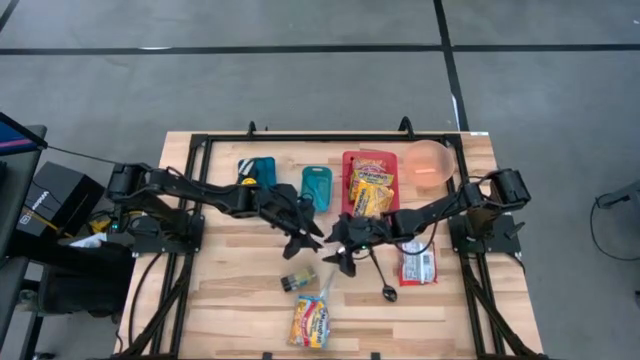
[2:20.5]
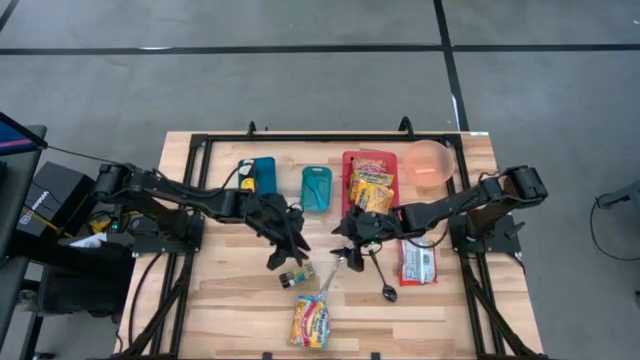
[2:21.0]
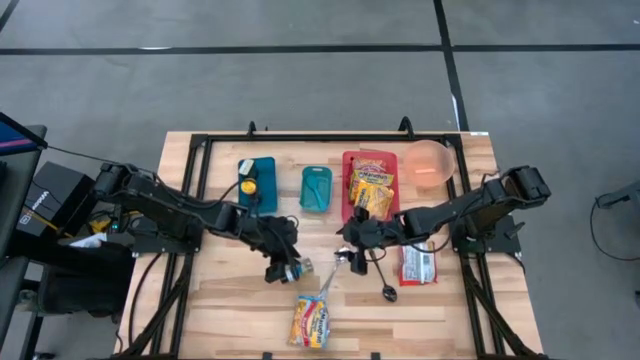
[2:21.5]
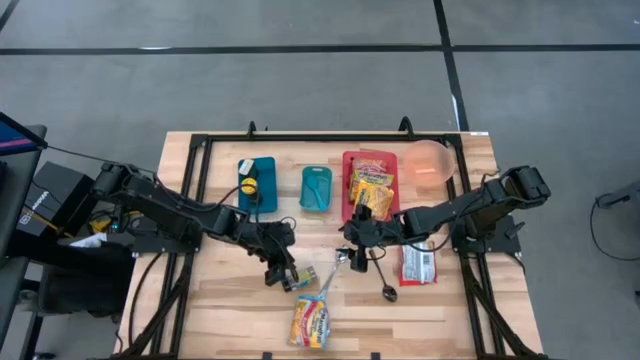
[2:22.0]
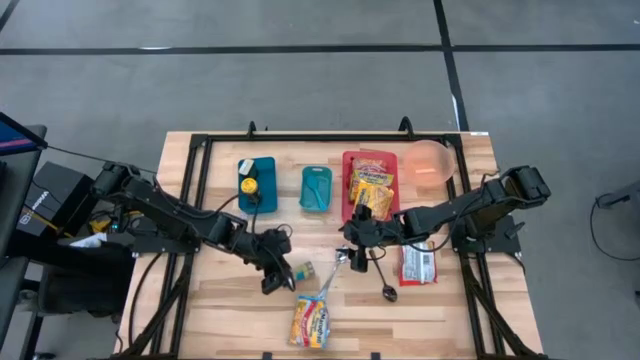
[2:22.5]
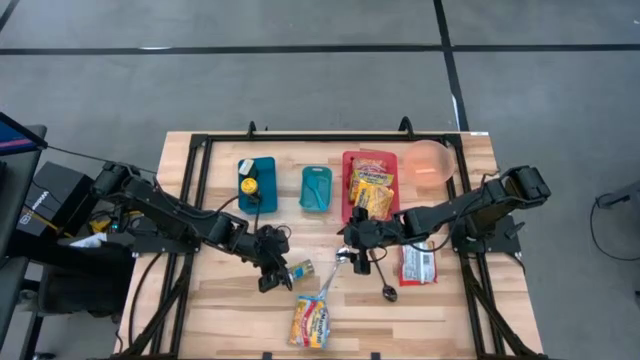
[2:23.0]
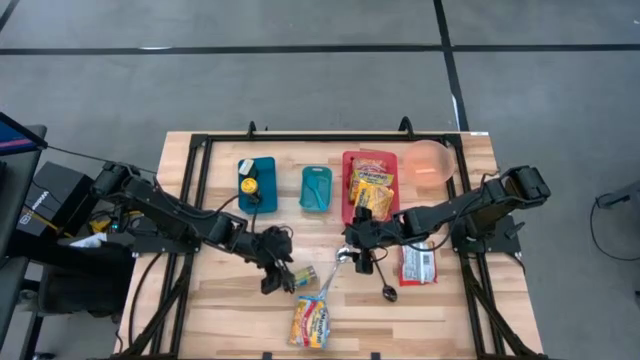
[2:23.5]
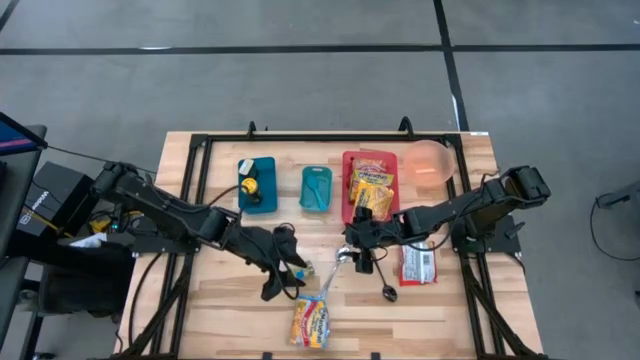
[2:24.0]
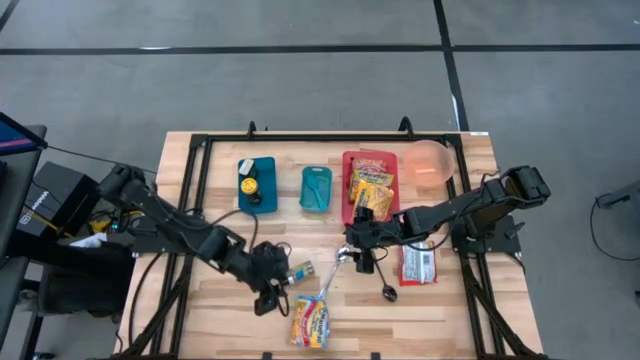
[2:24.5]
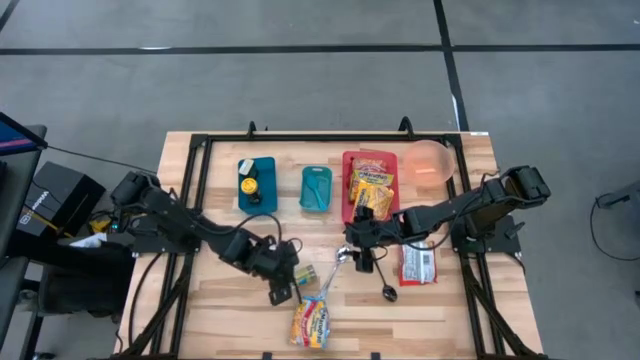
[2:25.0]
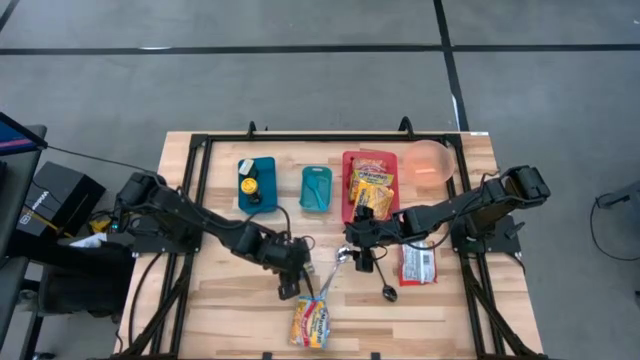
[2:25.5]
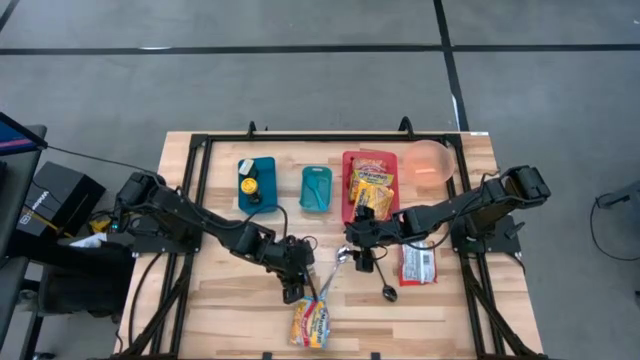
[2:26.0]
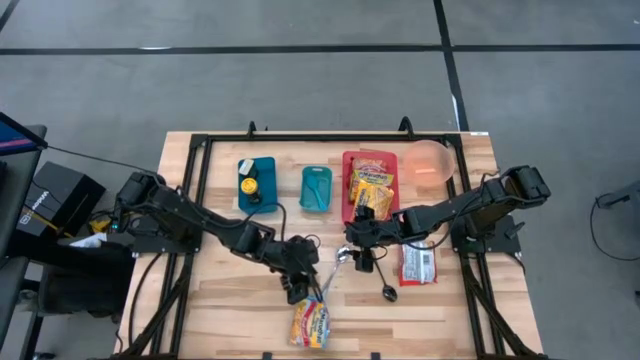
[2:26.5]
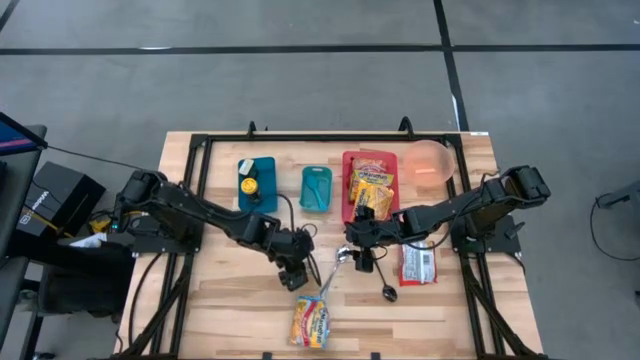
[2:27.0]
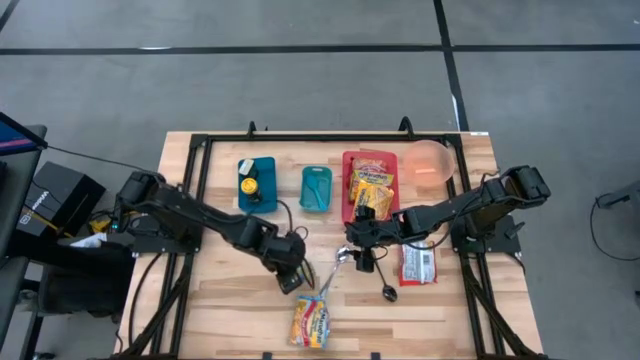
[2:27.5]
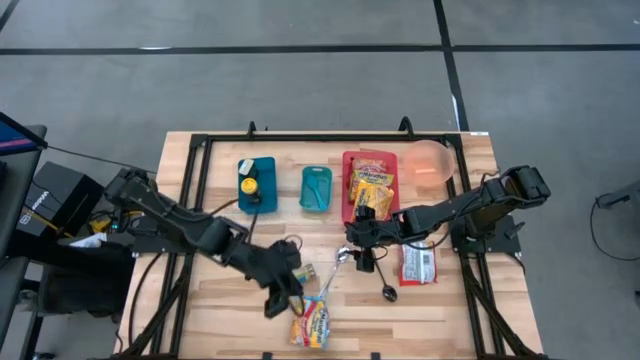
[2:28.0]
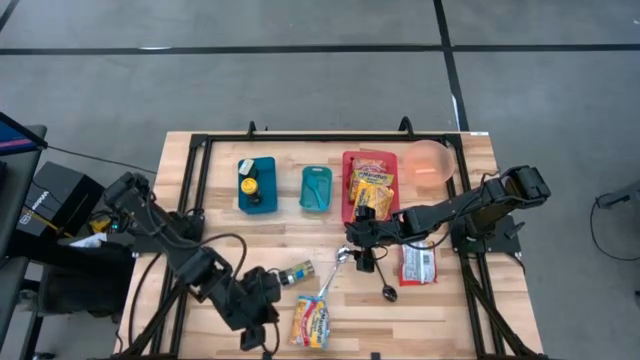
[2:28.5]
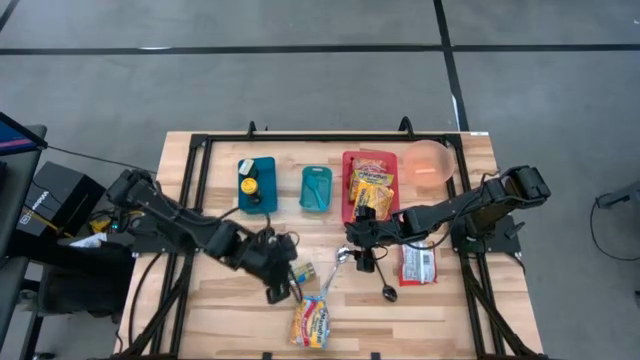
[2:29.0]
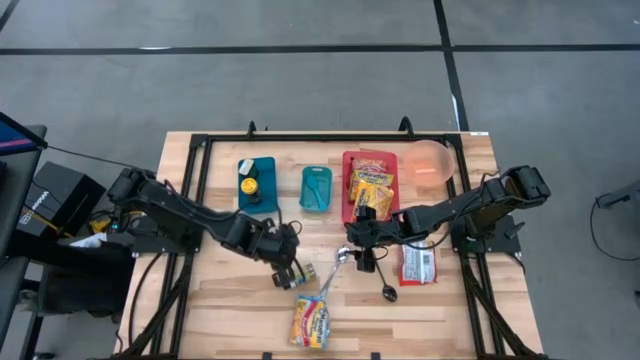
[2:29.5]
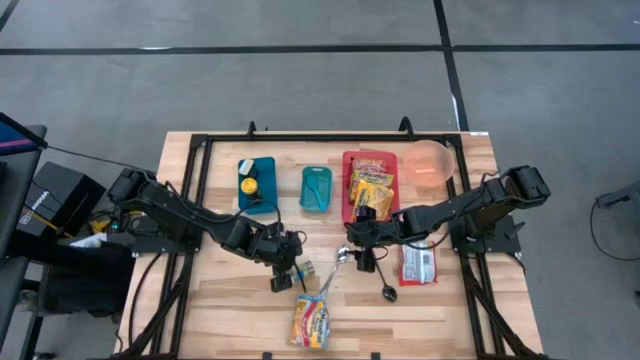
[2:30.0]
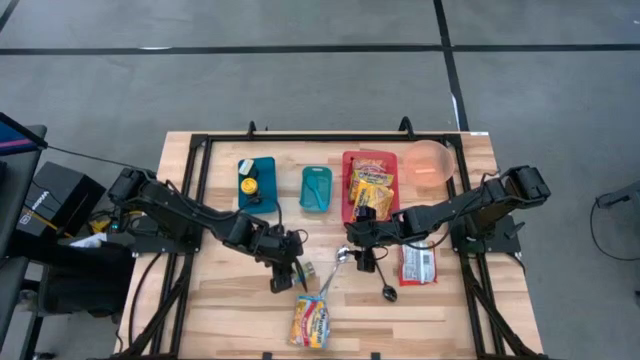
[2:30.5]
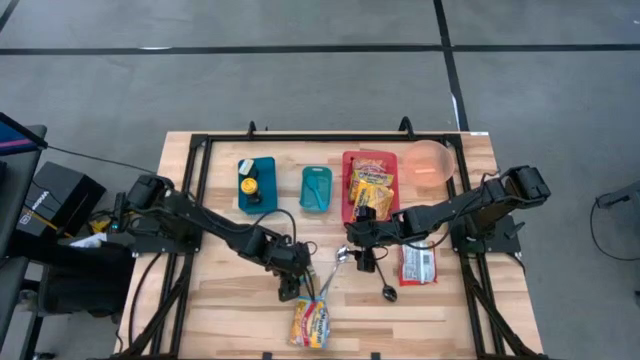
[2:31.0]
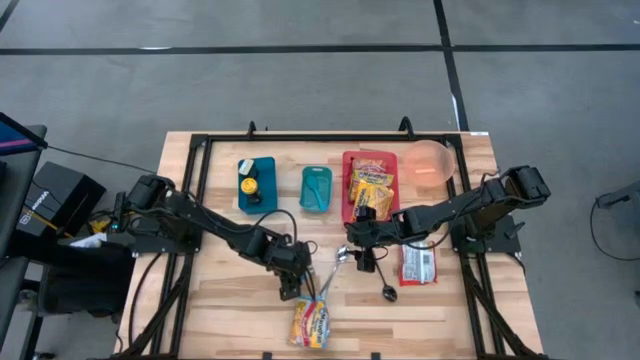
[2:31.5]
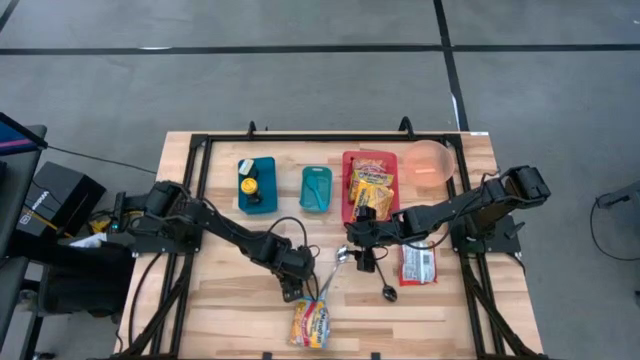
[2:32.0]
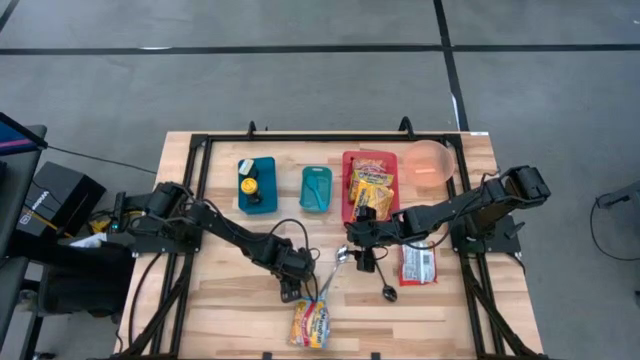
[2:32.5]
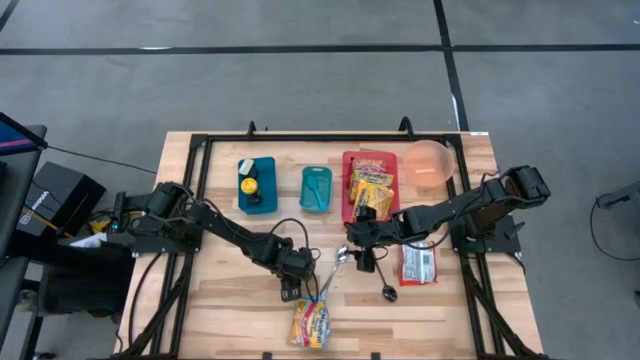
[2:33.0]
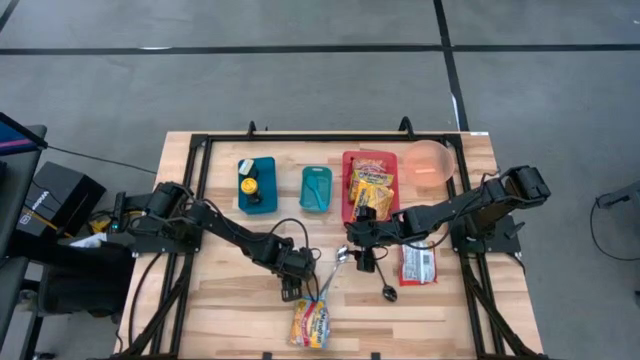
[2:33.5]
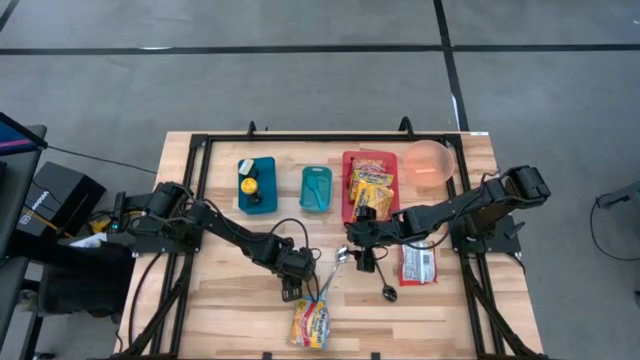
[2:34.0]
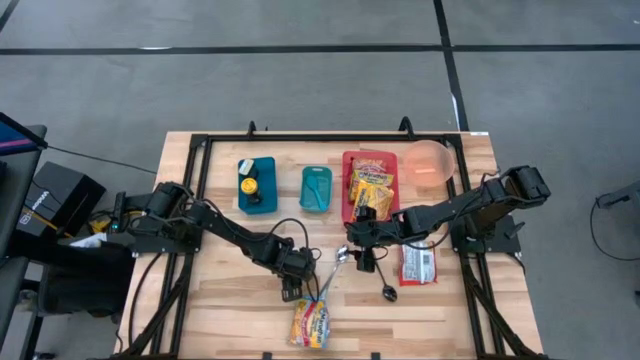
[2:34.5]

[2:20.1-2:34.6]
Task: Pick & Place Food Item
Put the black spice bottle into the blue bin

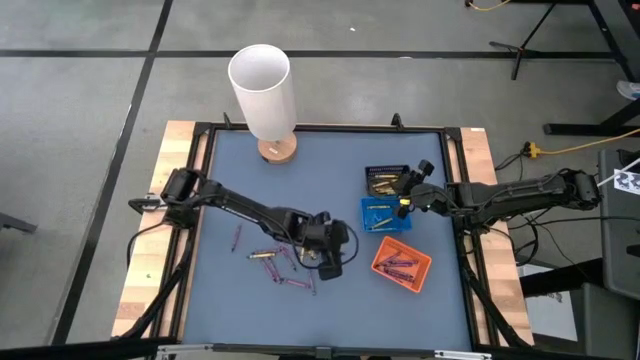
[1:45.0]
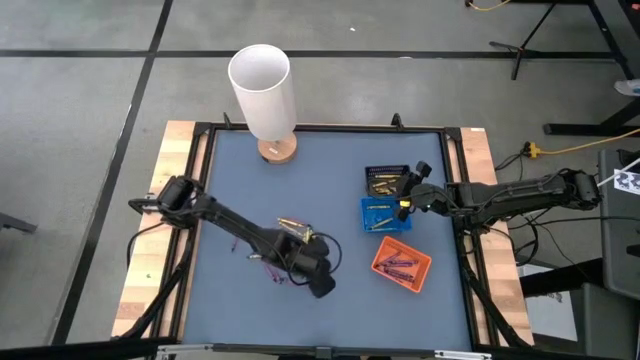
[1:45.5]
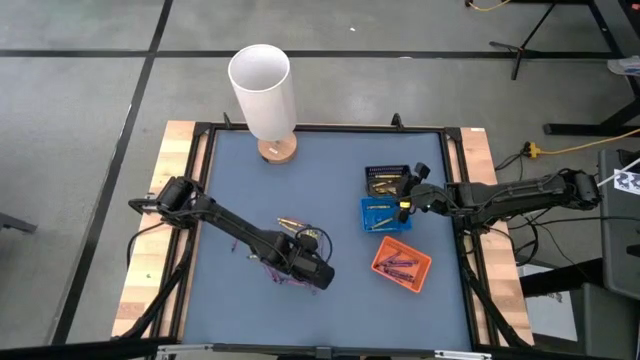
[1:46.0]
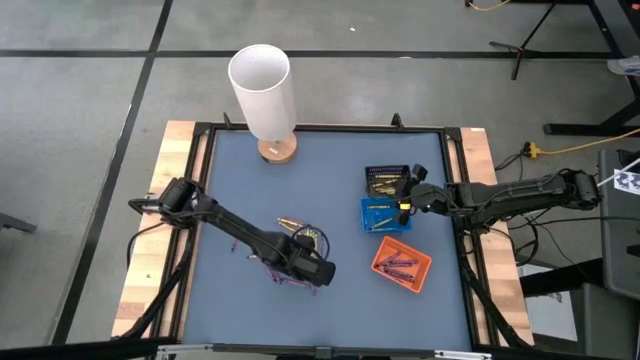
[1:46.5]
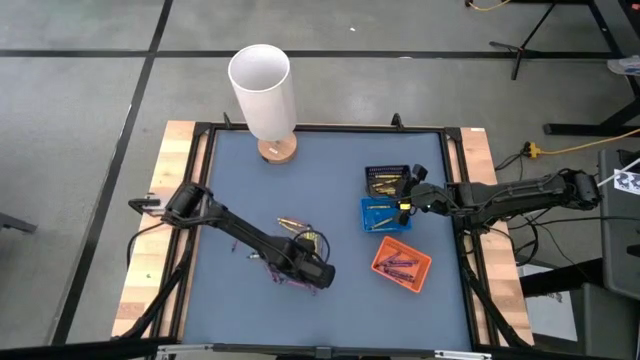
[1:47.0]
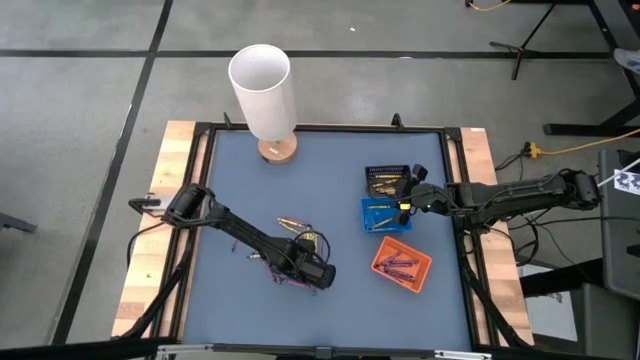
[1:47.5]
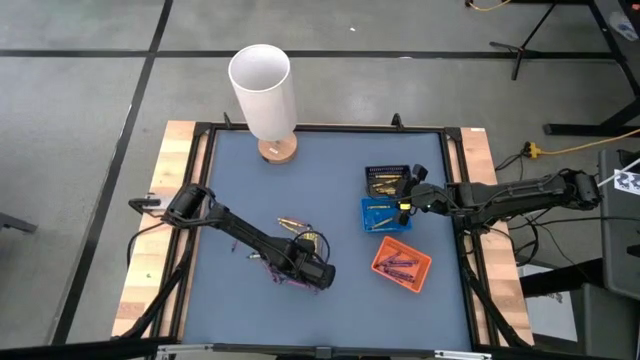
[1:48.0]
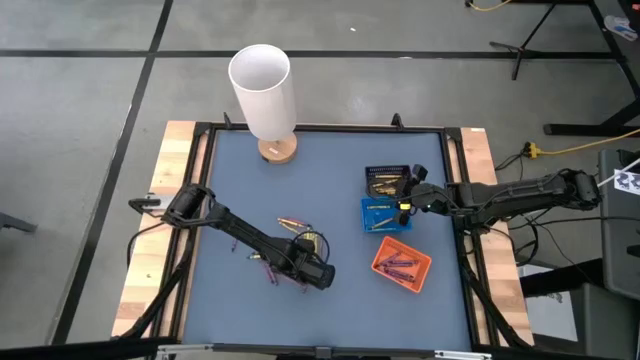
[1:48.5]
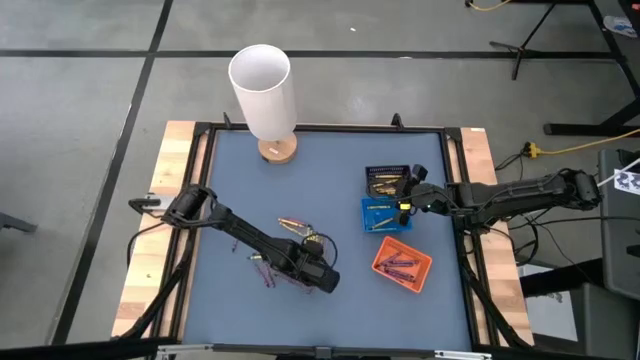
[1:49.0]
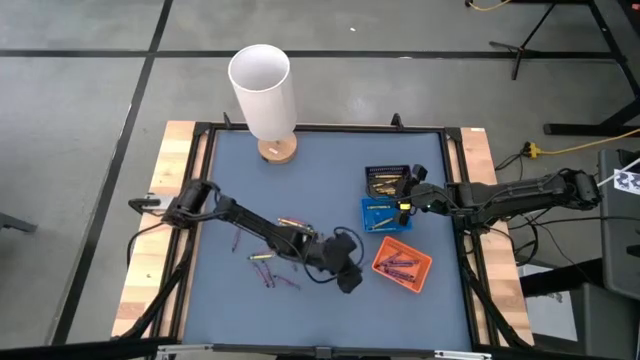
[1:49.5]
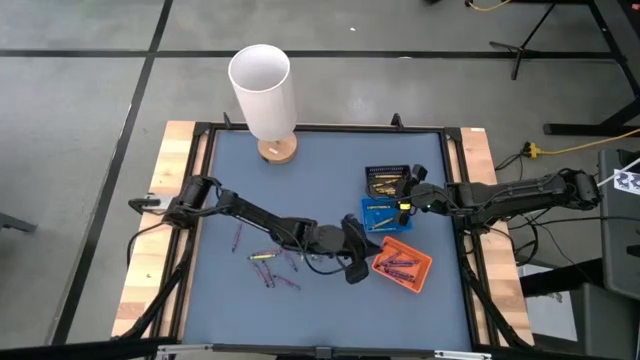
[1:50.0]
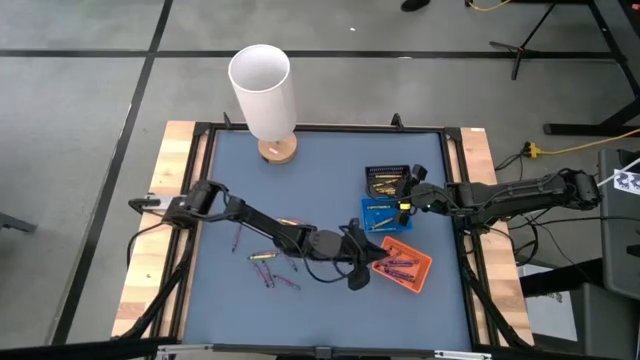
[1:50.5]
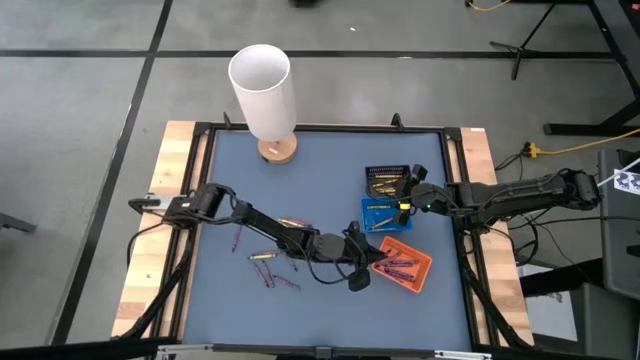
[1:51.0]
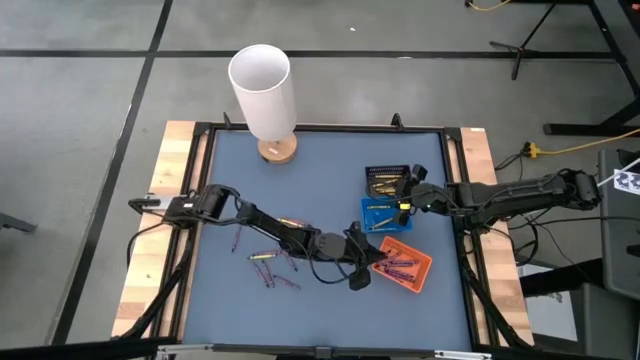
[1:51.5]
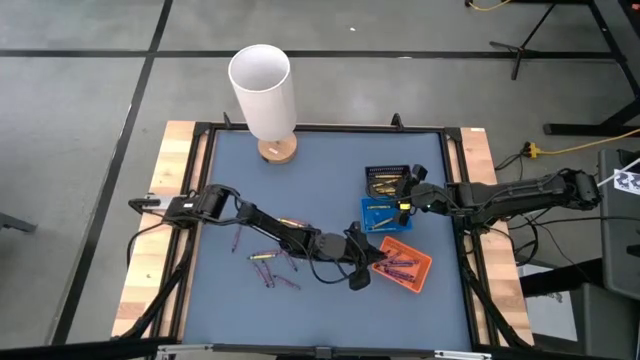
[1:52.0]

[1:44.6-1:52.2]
Task: Sort crayons
Put the purple crayon into the orange bin
